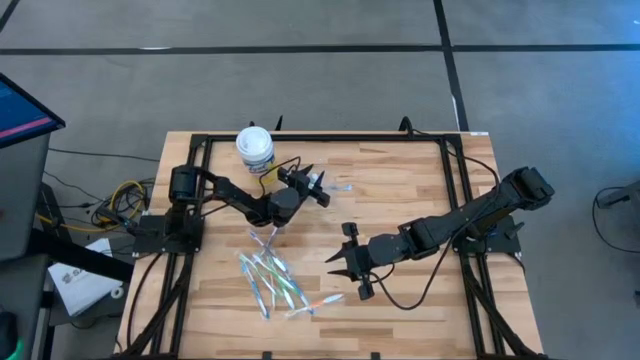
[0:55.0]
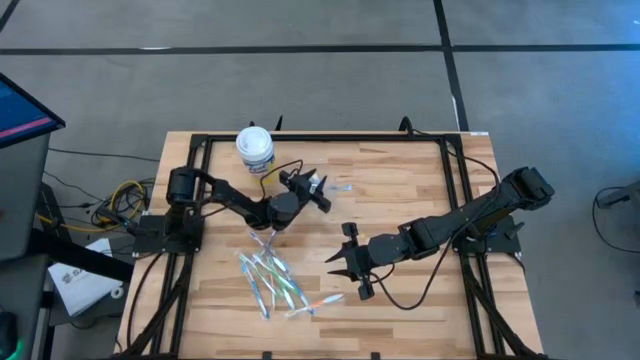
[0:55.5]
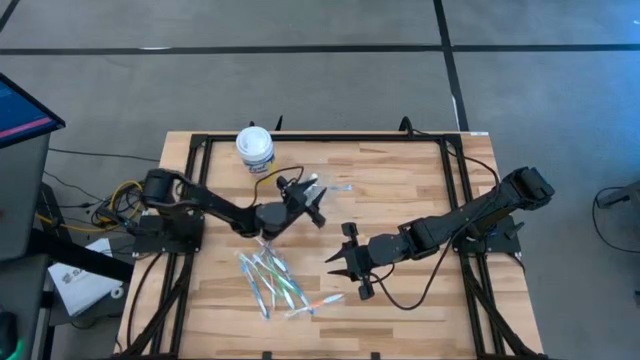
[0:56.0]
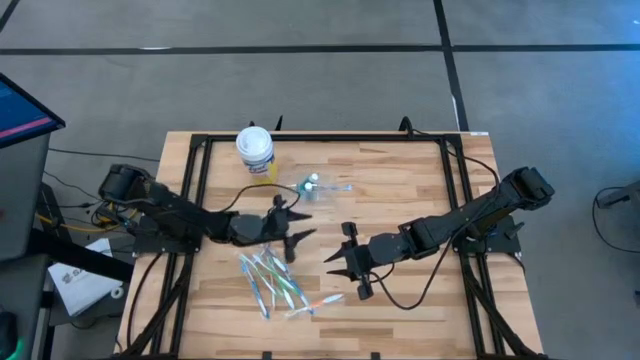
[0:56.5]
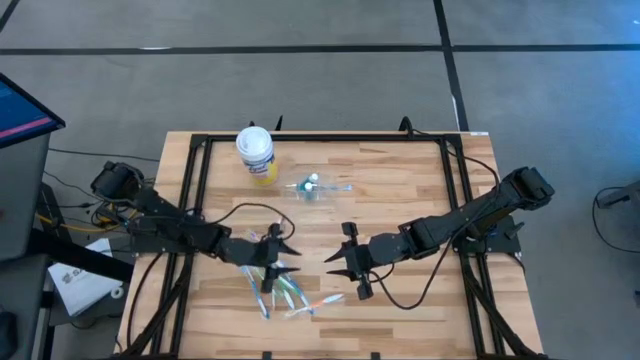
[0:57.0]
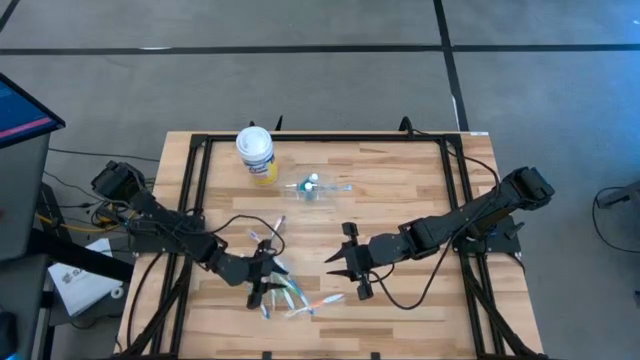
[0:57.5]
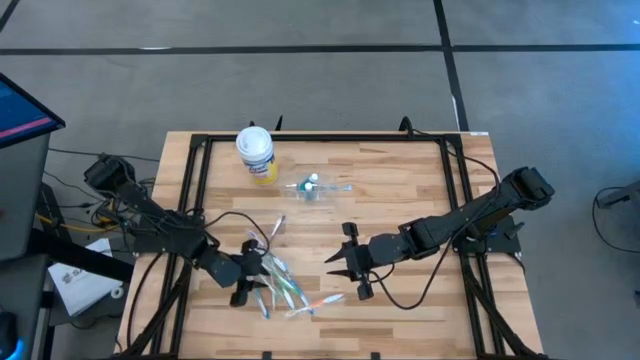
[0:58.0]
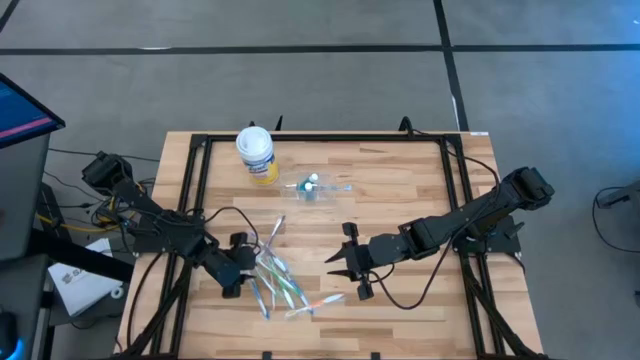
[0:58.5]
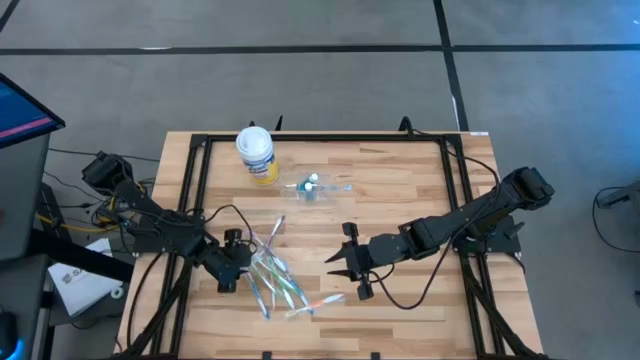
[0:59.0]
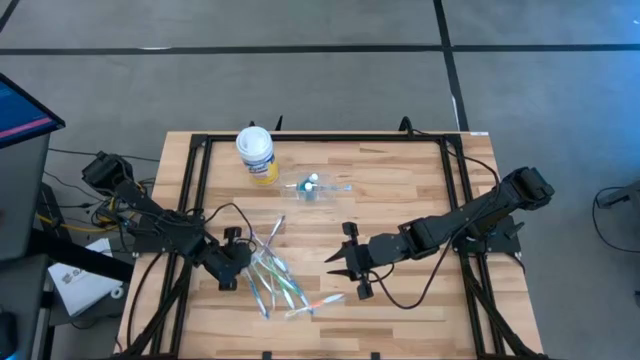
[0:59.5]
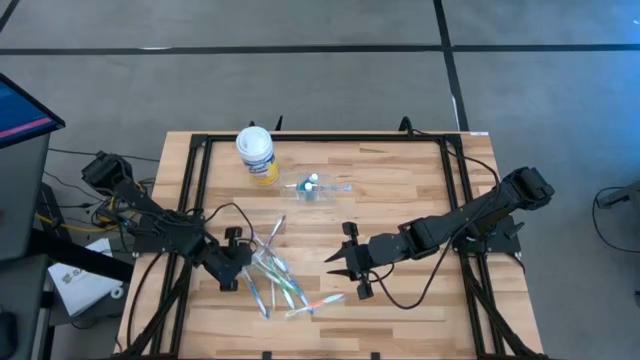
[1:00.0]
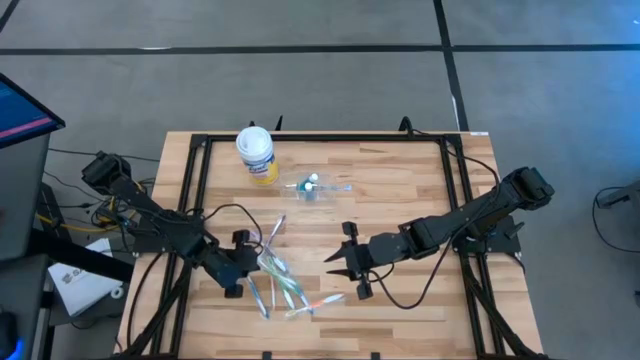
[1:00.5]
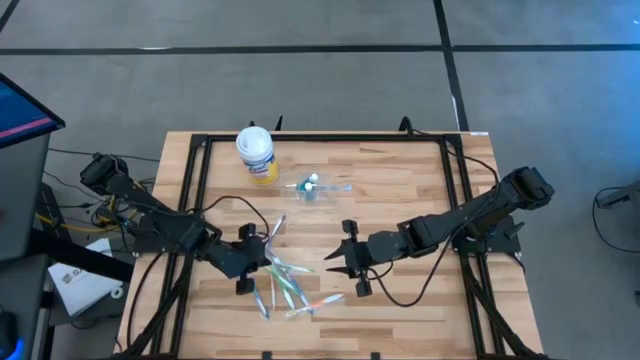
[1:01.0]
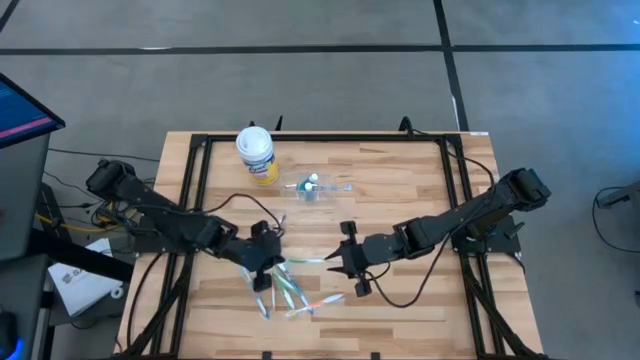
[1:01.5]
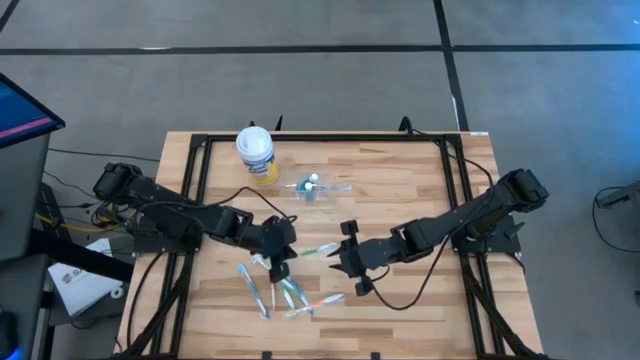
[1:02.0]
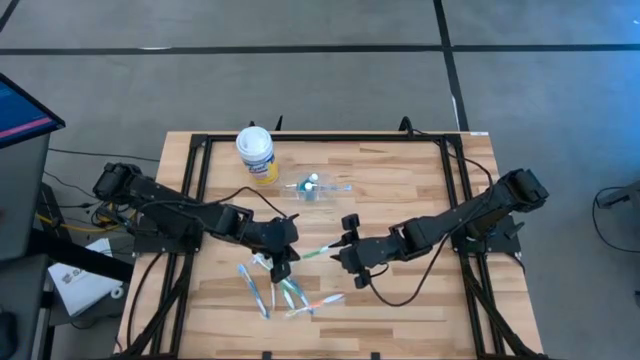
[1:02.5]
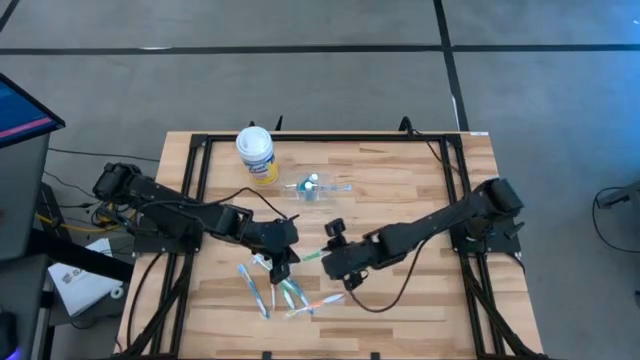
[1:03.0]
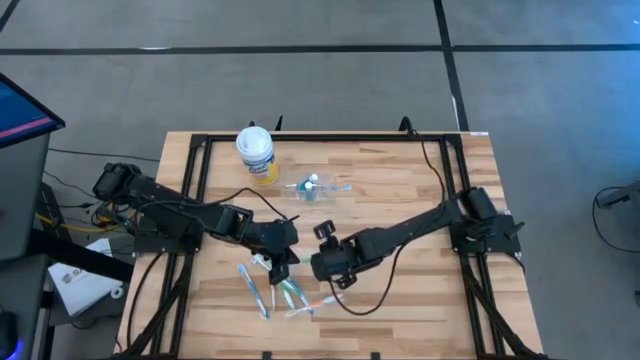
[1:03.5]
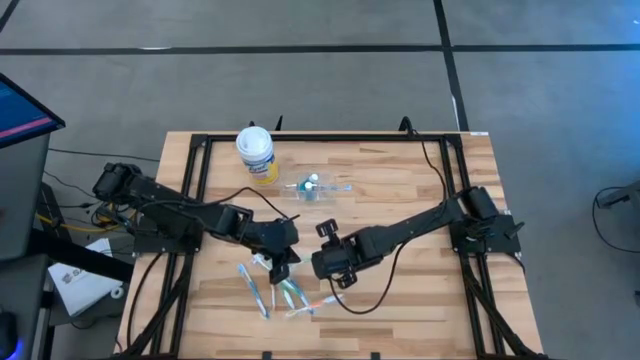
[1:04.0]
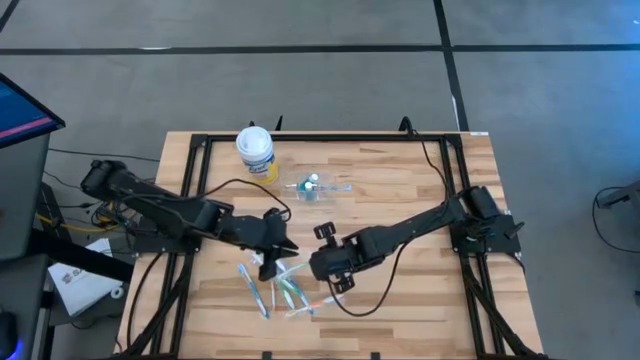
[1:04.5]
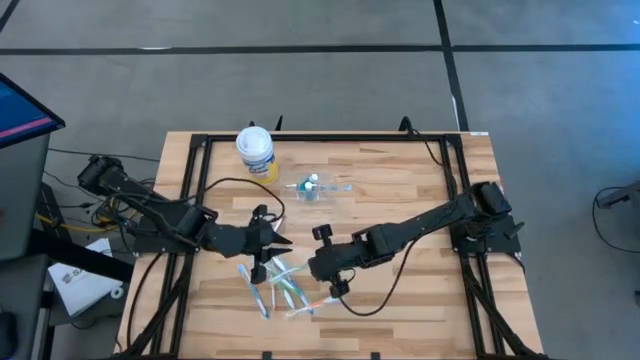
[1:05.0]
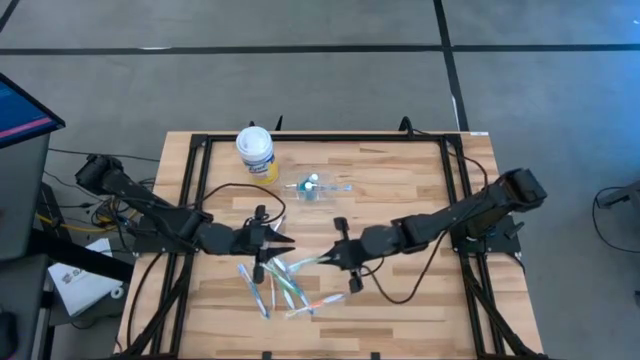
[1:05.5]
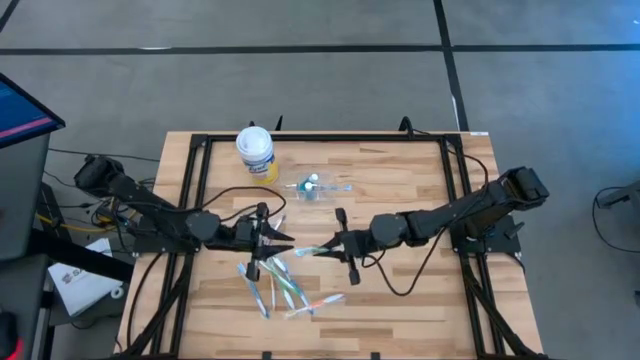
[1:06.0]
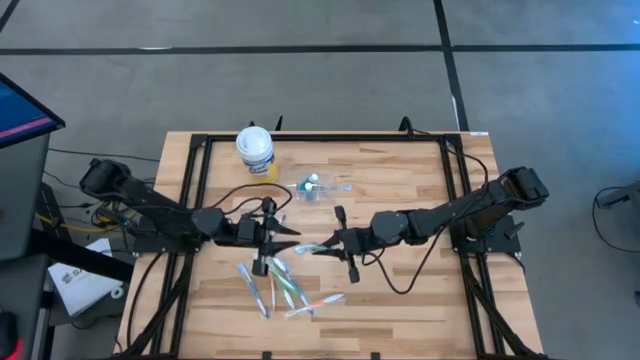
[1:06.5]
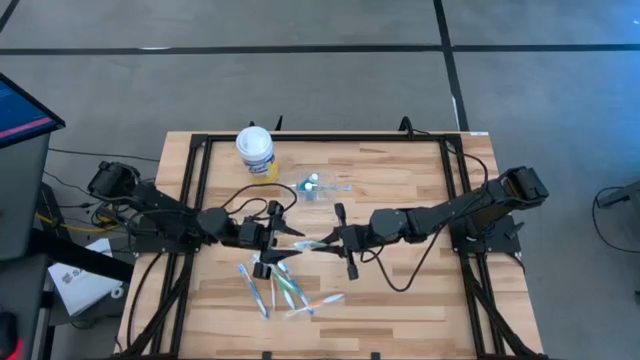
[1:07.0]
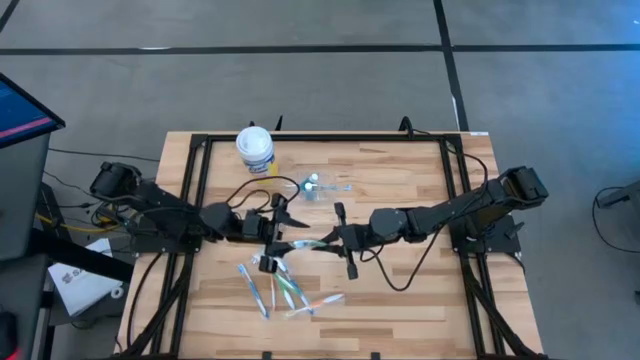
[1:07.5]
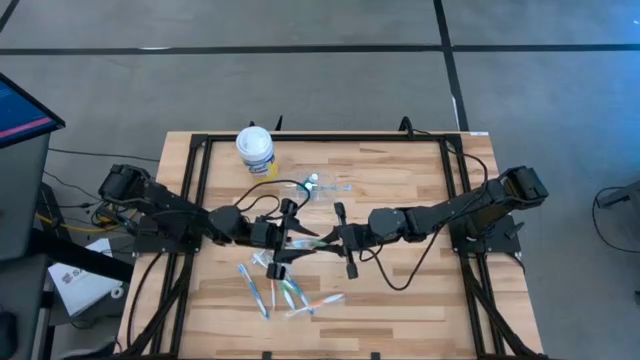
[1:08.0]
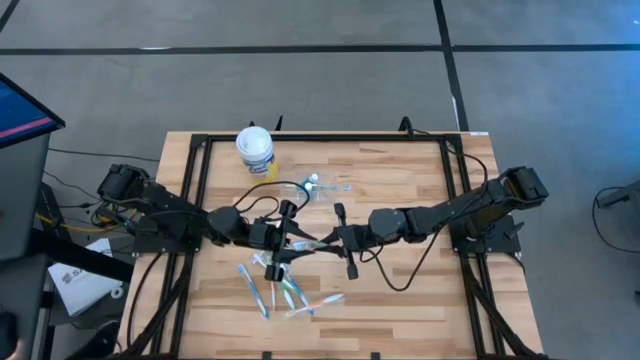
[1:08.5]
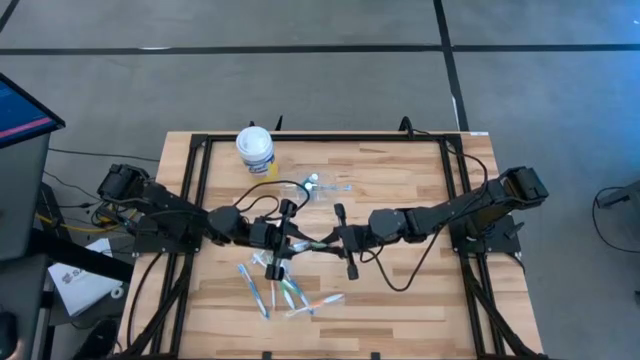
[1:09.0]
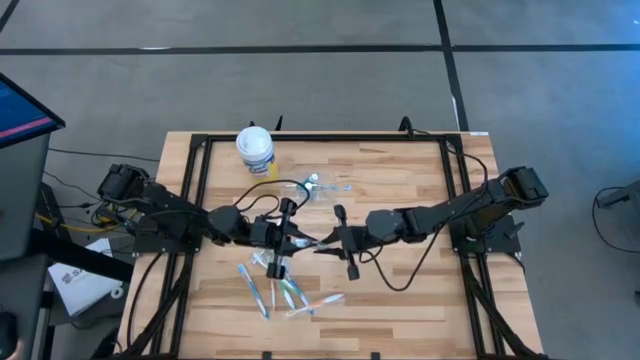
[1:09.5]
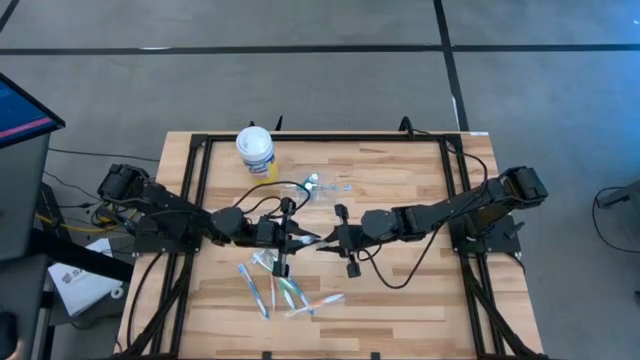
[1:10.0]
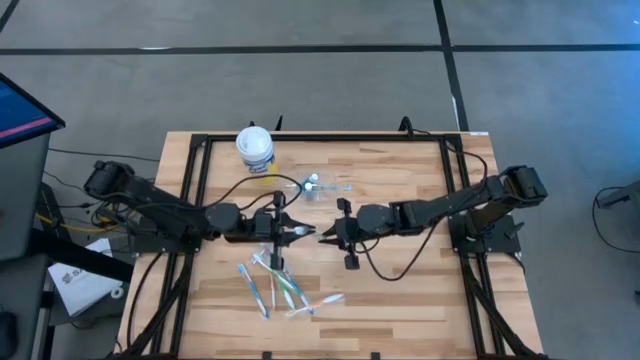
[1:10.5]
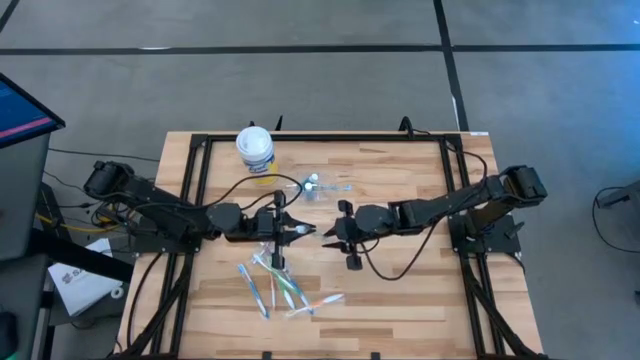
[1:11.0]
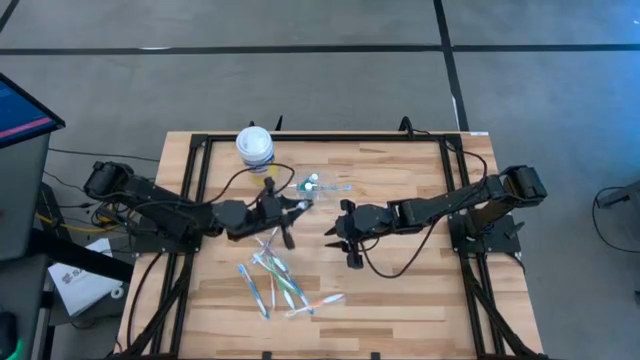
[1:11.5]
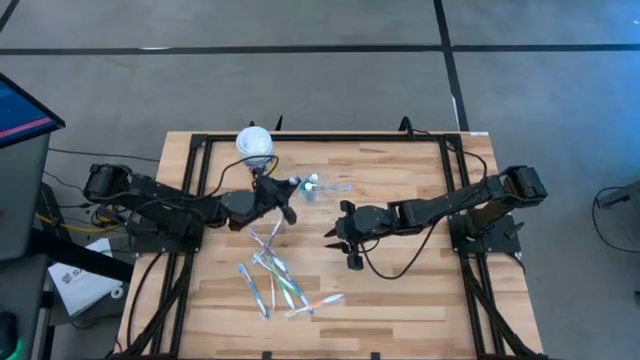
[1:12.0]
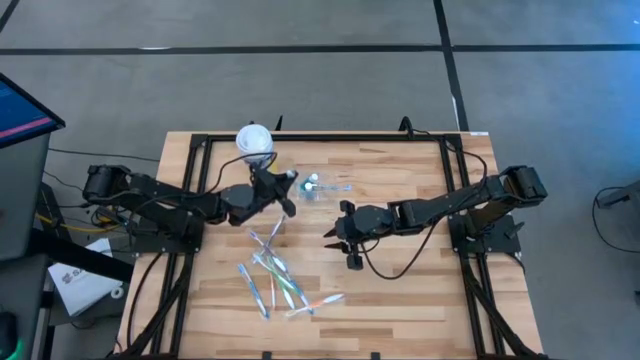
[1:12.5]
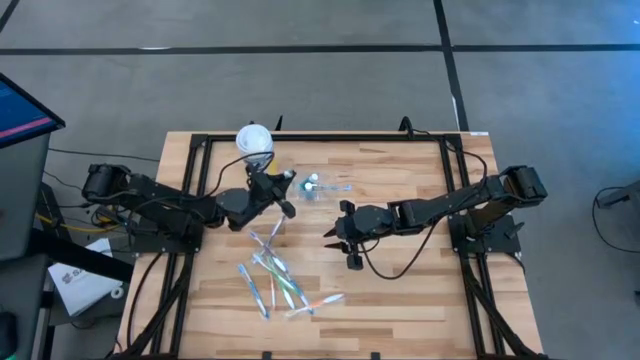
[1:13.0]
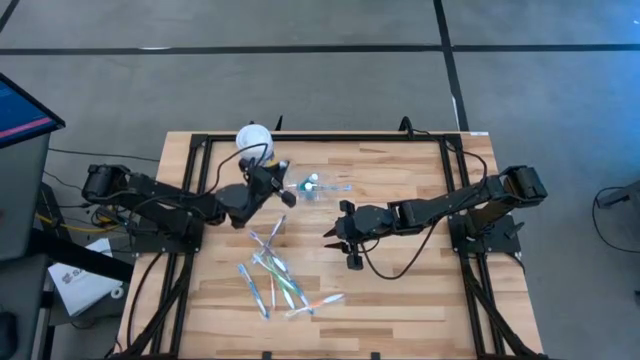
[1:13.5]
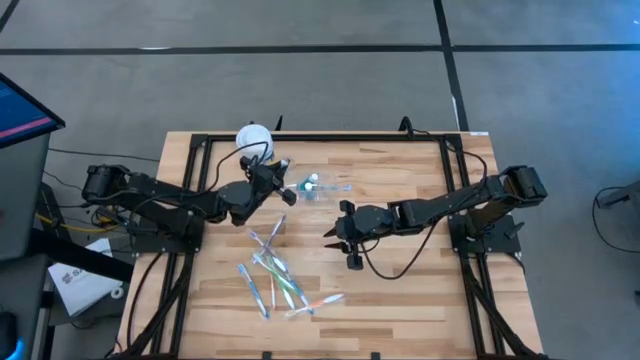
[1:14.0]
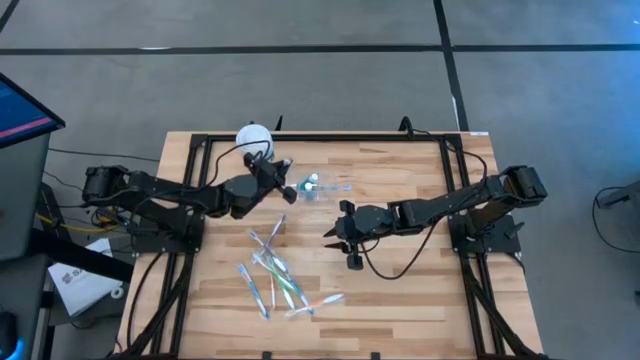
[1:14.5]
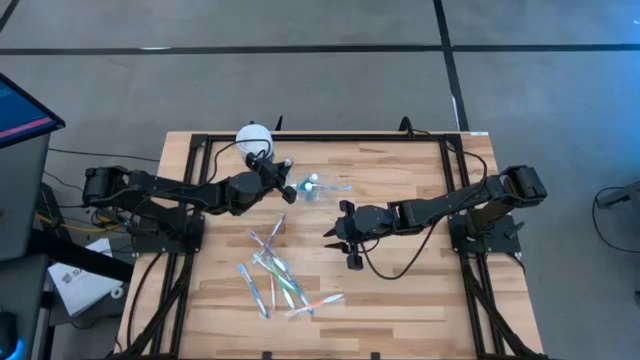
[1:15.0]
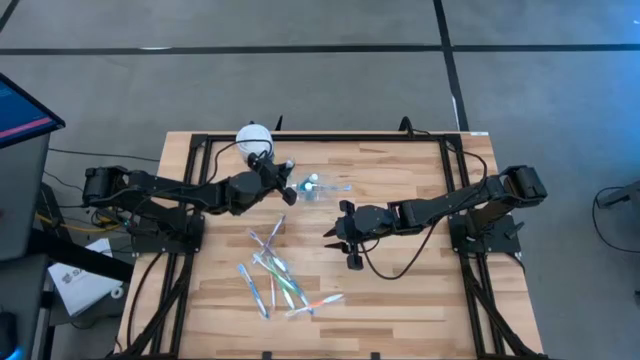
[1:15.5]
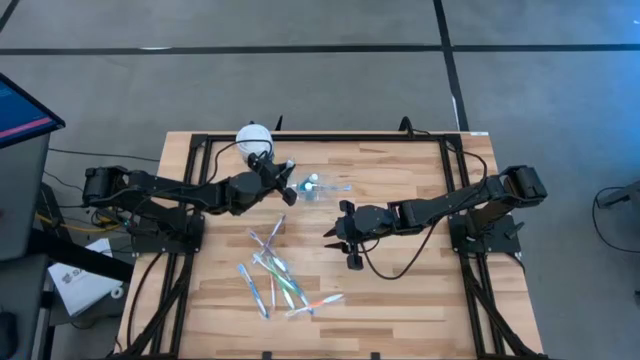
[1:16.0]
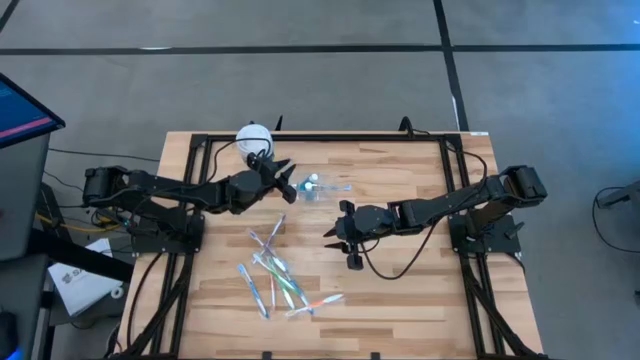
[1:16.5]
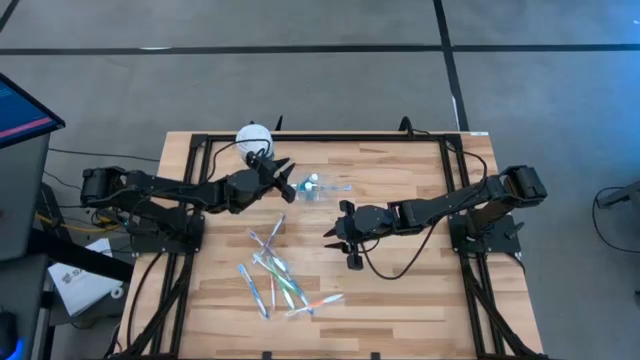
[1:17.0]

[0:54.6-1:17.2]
Task: Pick & Place toothbrushing station
Put the green toothbrush into the transparent organizer
